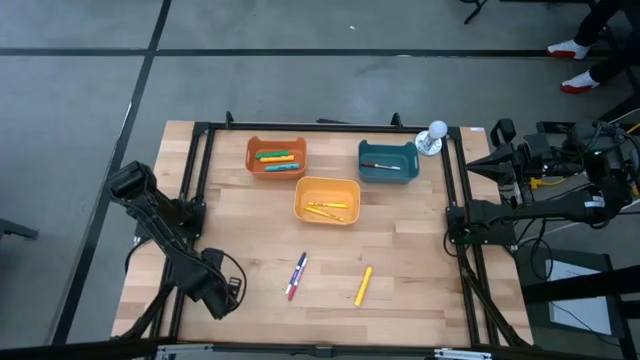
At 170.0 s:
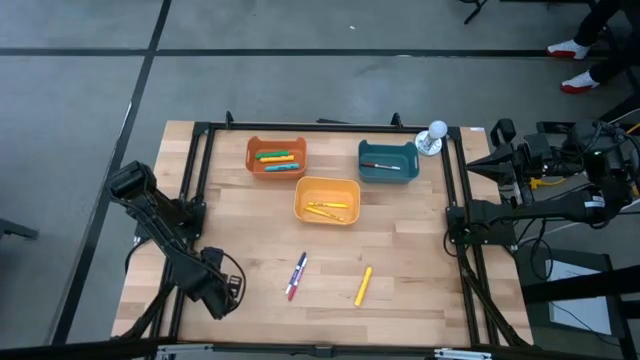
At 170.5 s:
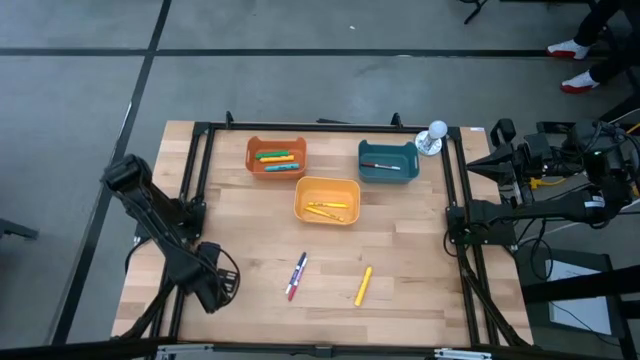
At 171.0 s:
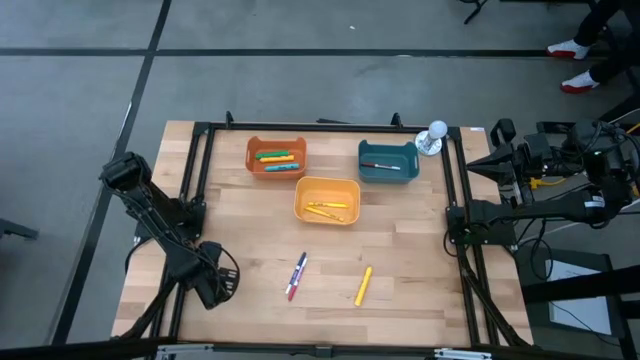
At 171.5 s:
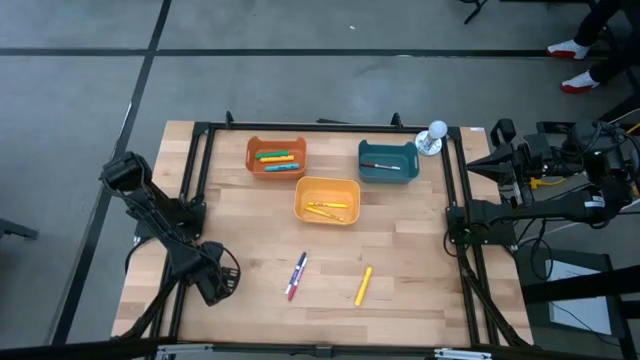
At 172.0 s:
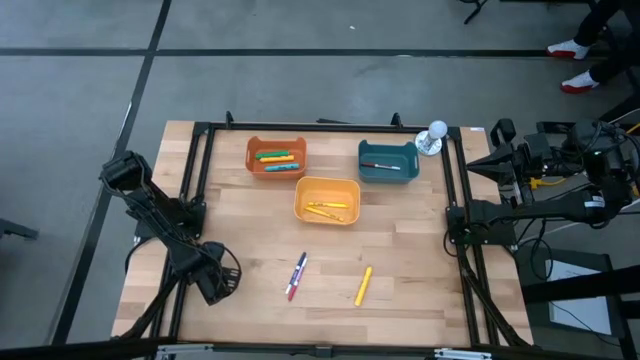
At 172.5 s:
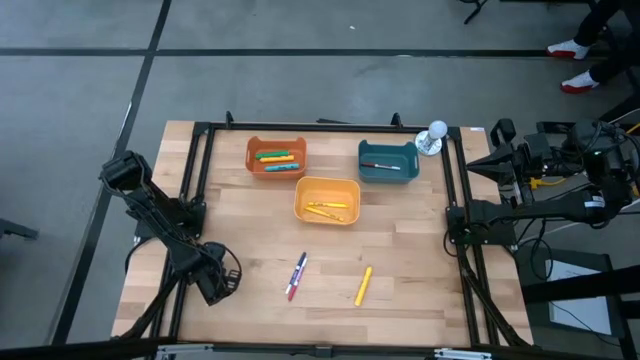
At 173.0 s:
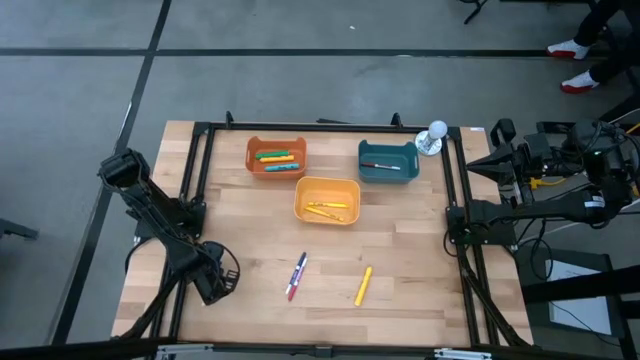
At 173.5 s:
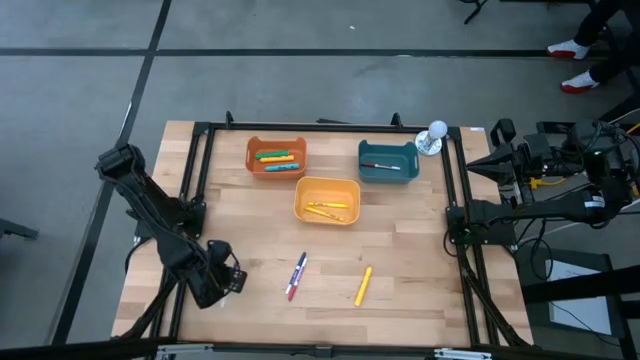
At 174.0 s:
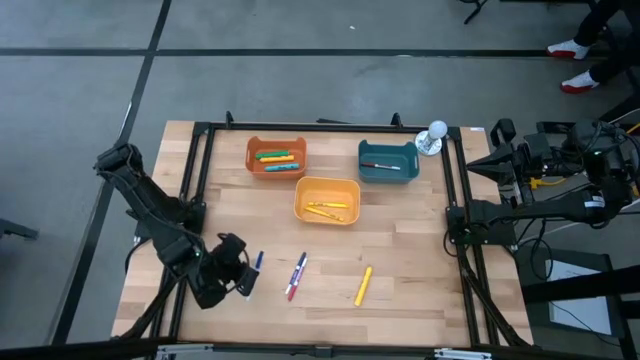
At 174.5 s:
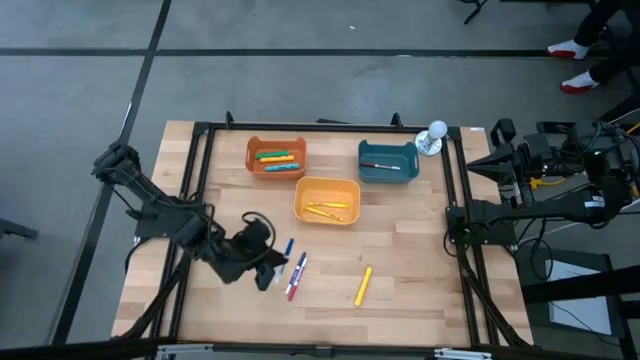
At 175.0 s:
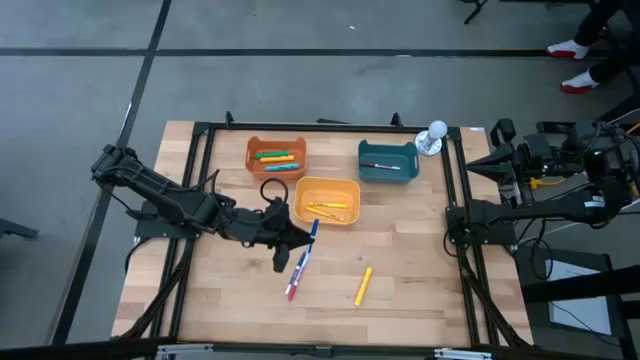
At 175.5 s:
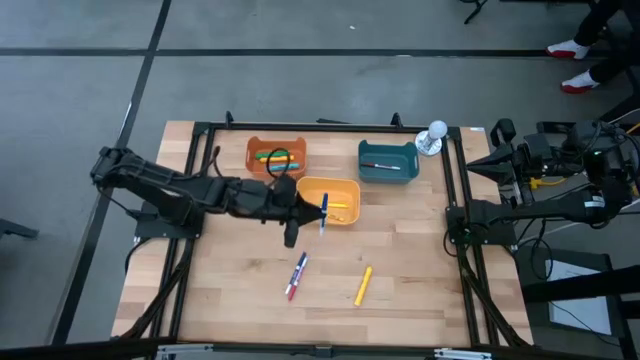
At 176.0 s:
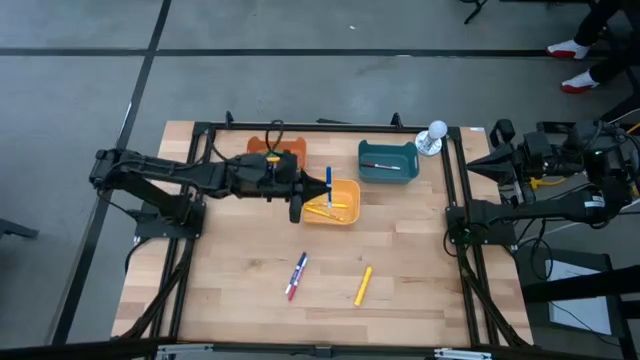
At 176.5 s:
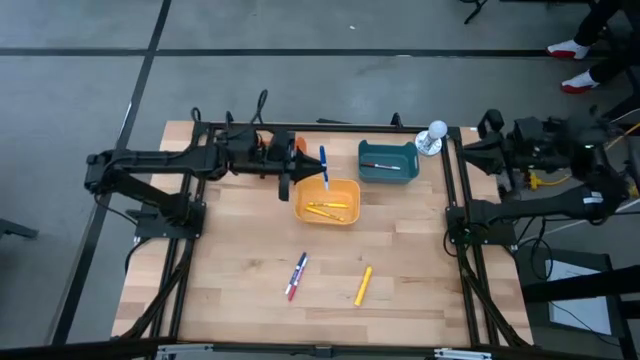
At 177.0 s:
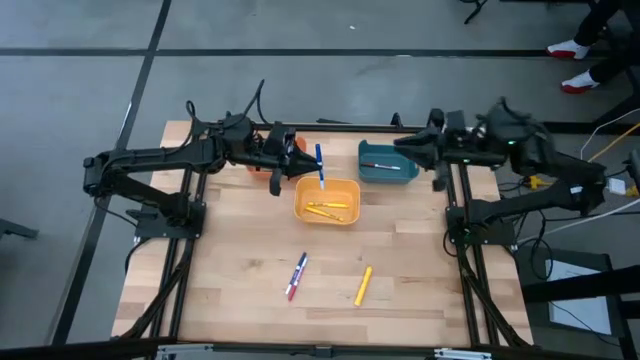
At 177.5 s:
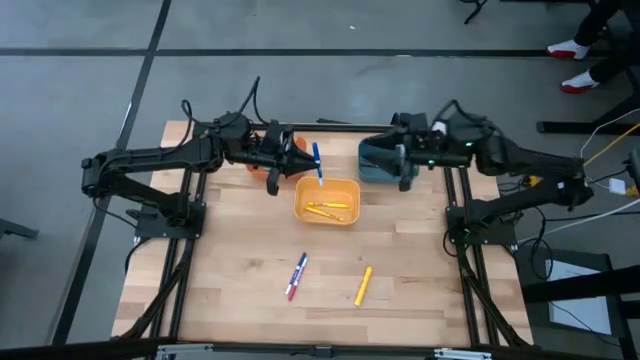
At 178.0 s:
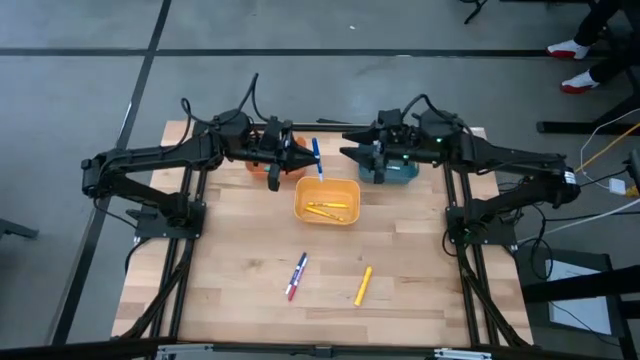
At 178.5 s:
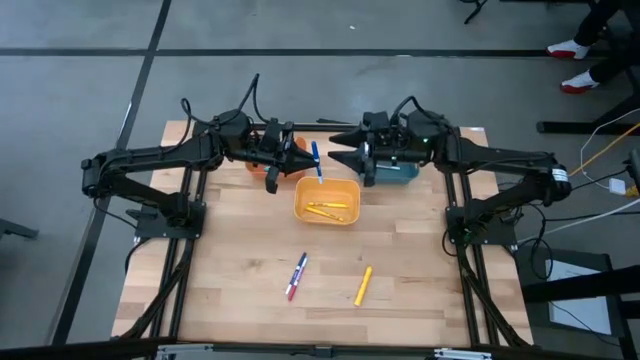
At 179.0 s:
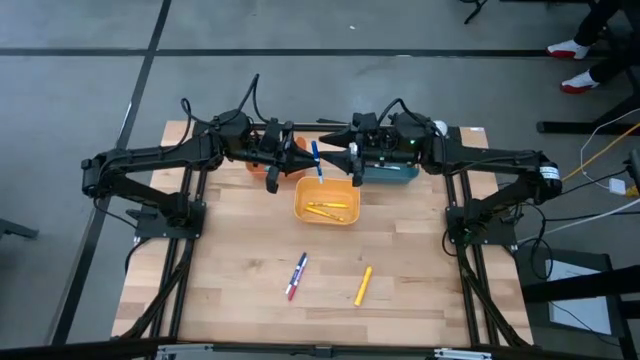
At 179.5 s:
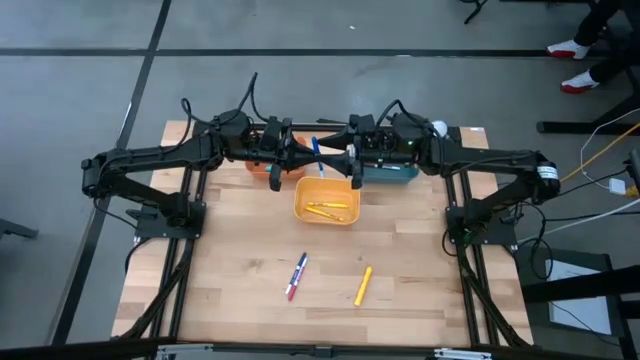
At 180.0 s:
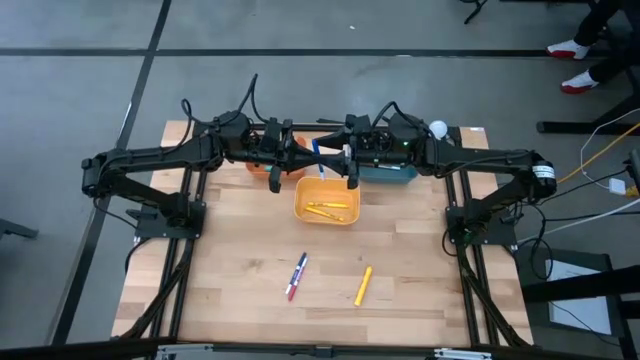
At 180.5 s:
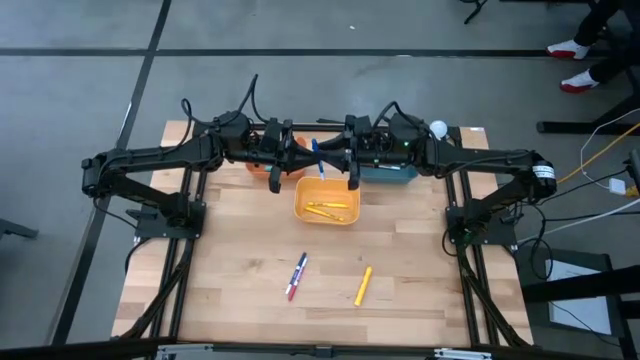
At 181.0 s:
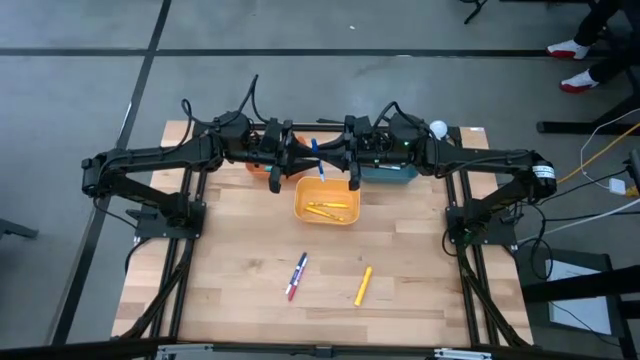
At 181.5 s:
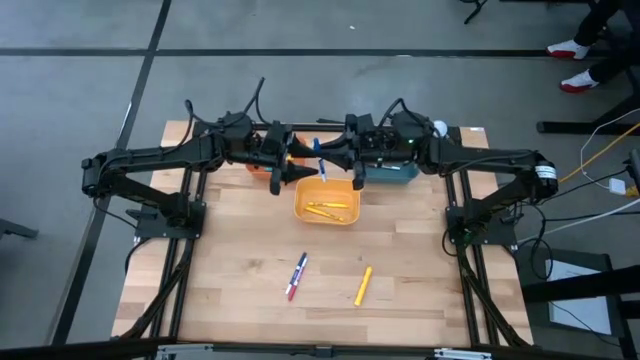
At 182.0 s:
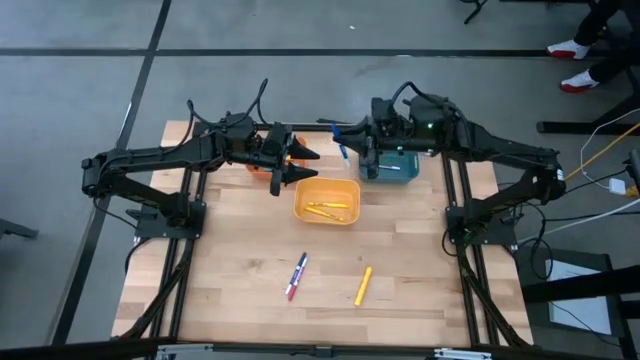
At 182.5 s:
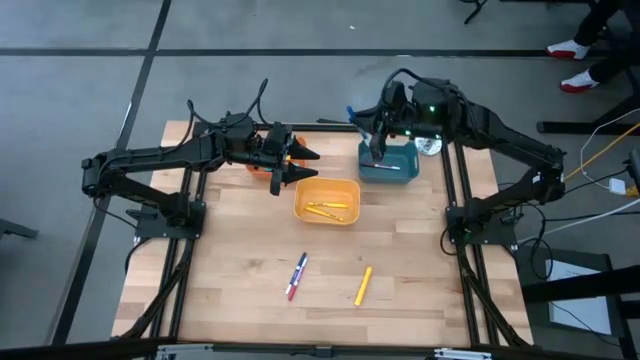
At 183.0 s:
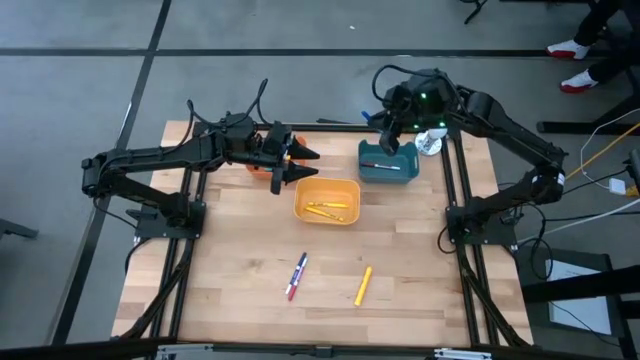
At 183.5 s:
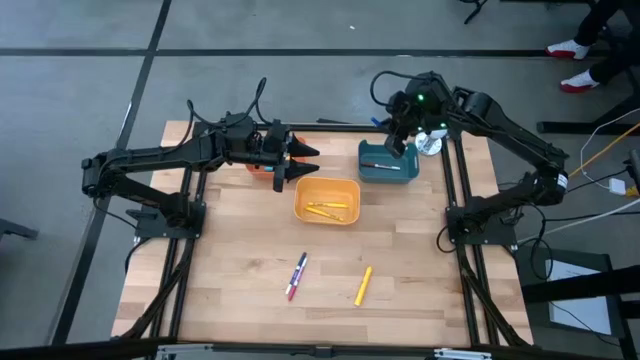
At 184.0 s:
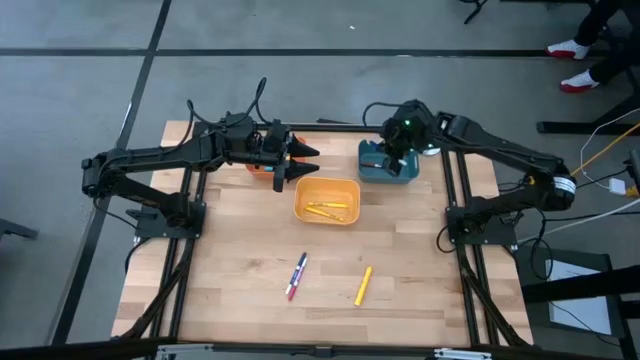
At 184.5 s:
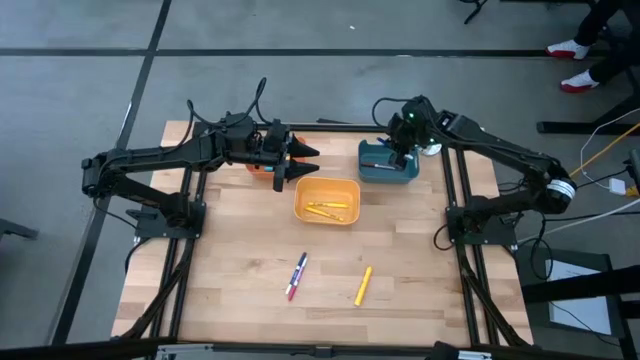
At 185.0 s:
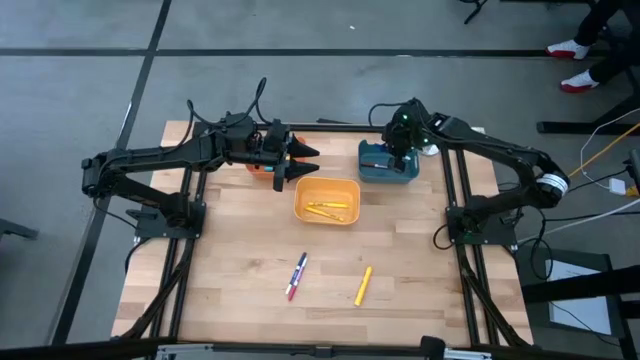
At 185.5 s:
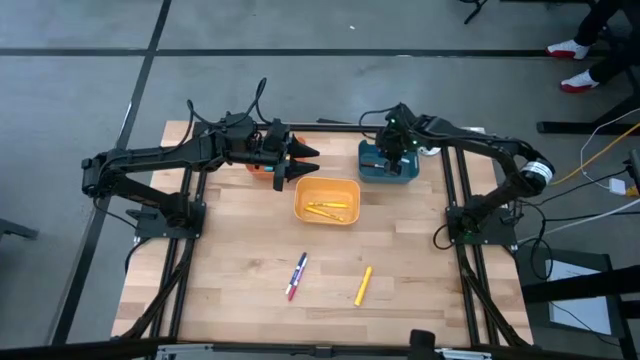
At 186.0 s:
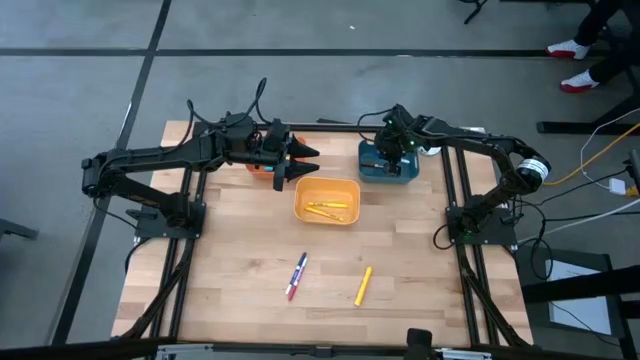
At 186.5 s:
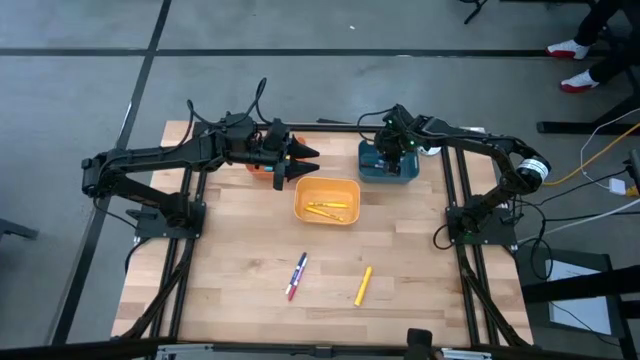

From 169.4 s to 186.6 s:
Task: Pick & Place Markers
Put the left blue marker pen into the blue bin

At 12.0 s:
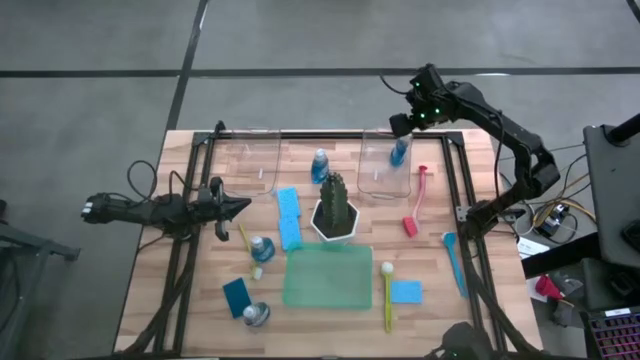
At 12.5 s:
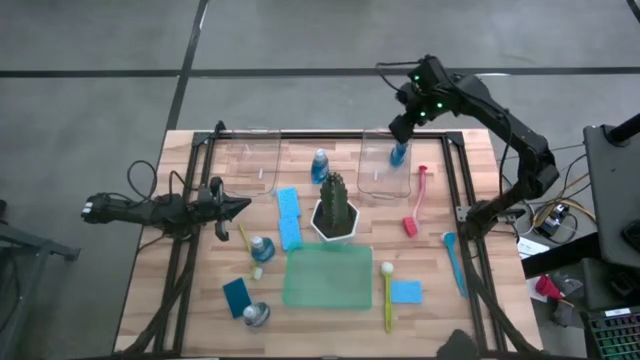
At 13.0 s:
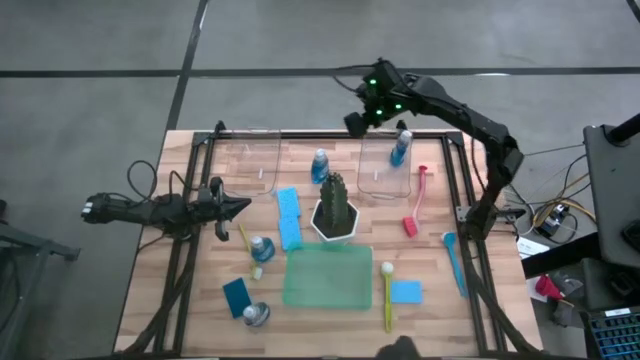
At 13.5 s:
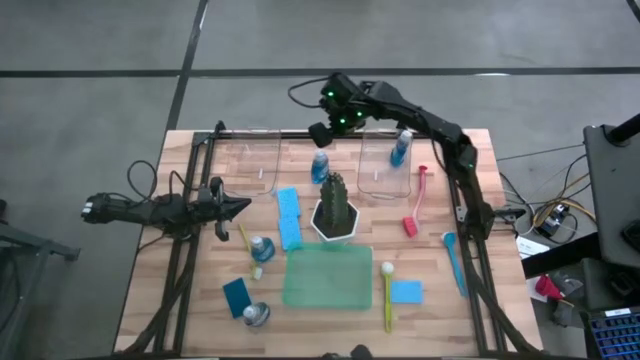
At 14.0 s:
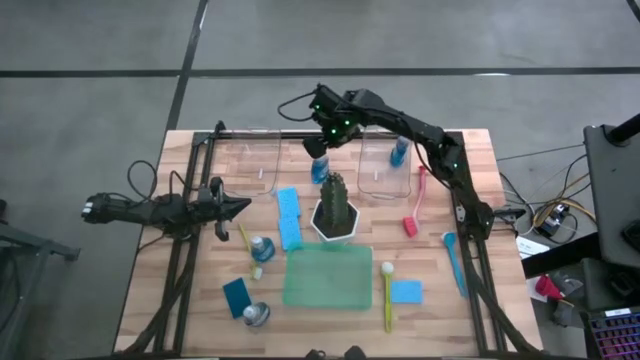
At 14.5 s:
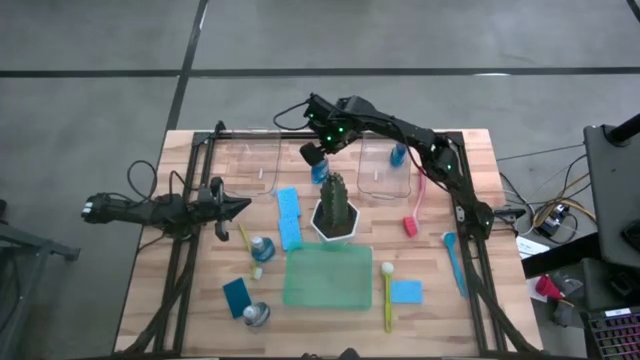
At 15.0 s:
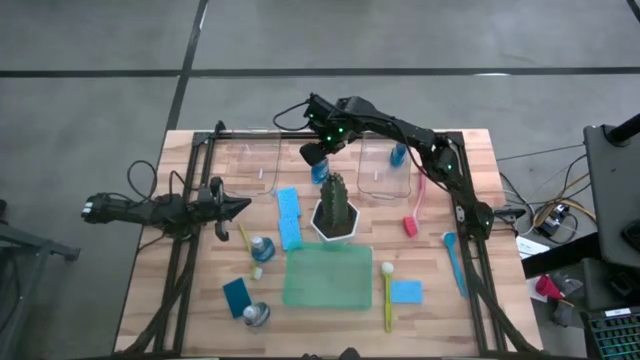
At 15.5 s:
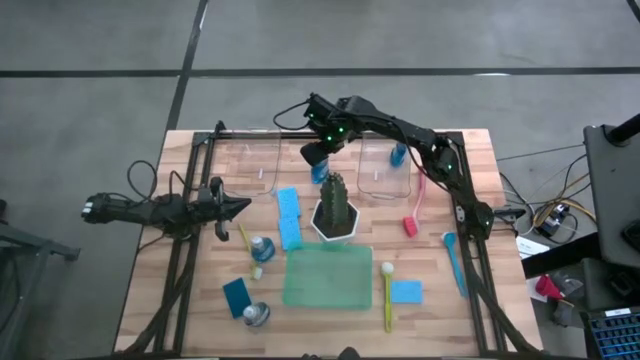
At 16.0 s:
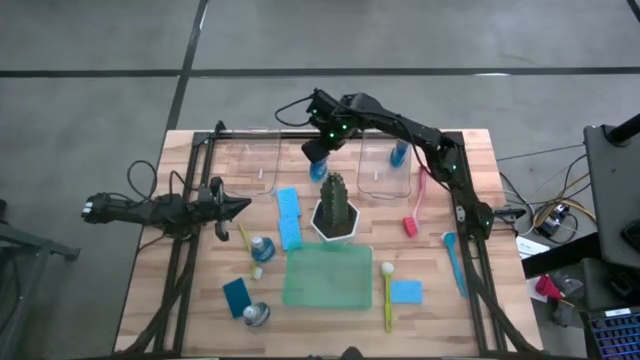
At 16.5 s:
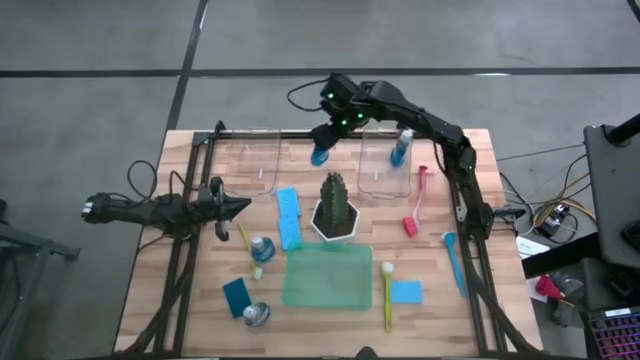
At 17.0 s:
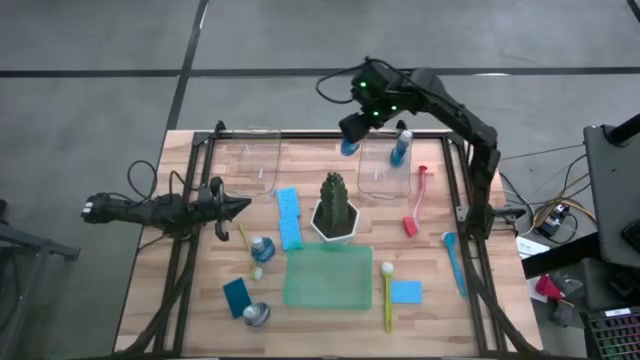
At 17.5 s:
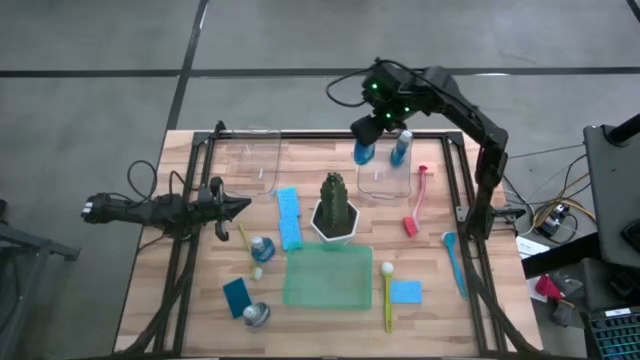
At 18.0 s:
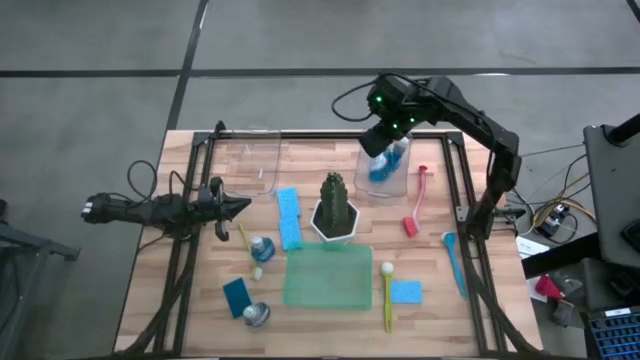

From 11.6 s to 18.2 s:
Task: Pick & Place Kitchen Sink Supplies
Put the dish soap into the right transparent bin
